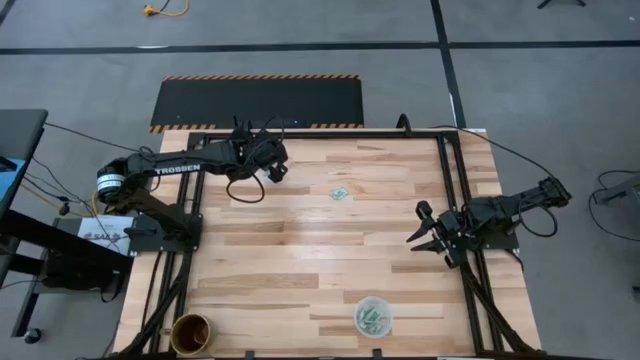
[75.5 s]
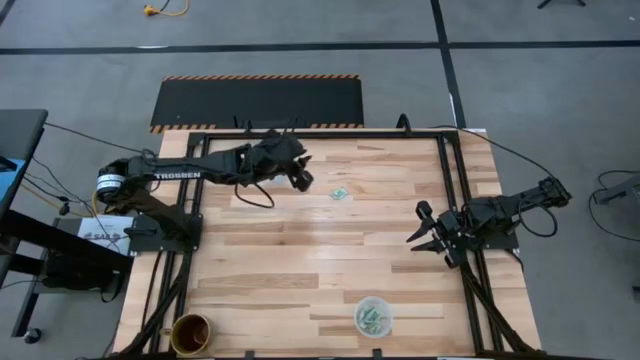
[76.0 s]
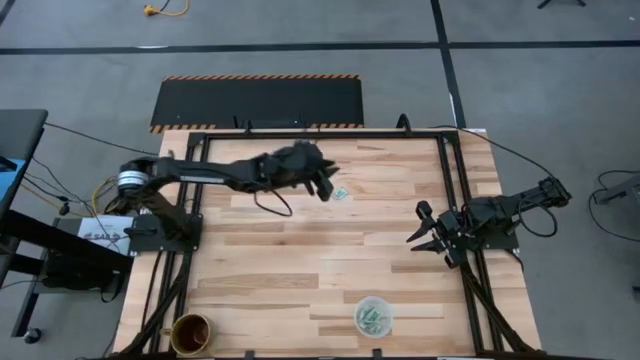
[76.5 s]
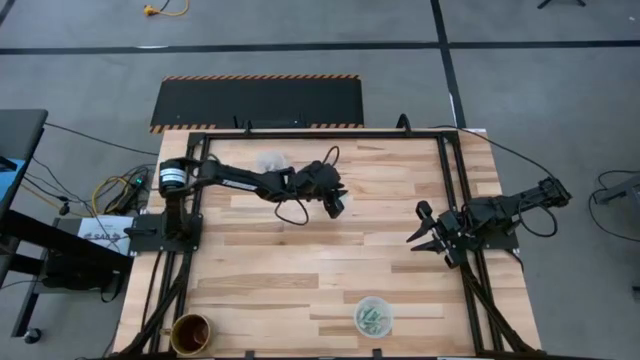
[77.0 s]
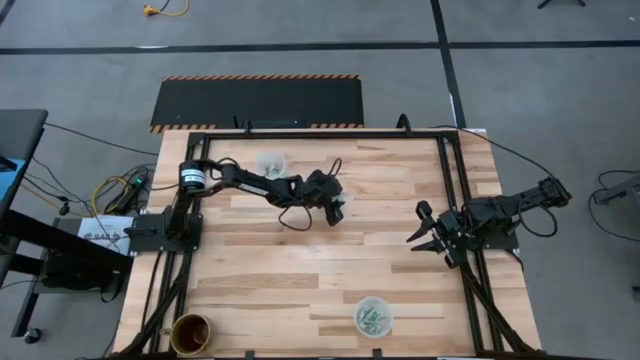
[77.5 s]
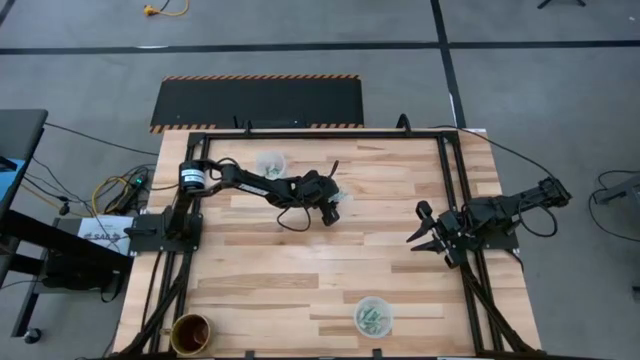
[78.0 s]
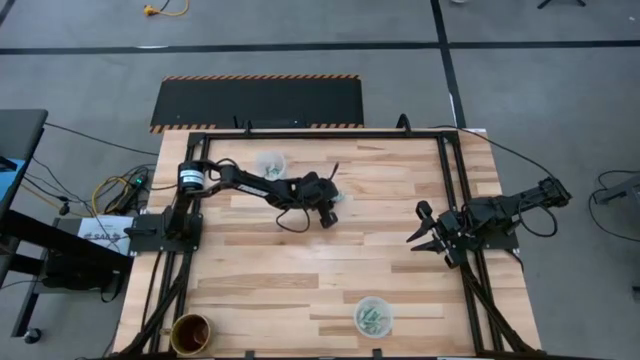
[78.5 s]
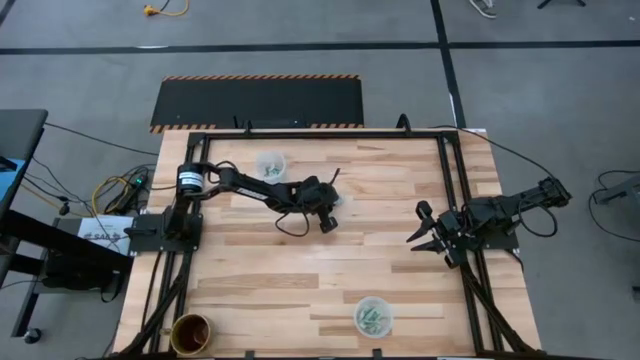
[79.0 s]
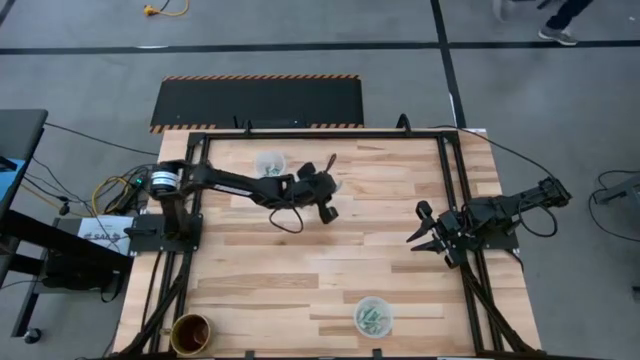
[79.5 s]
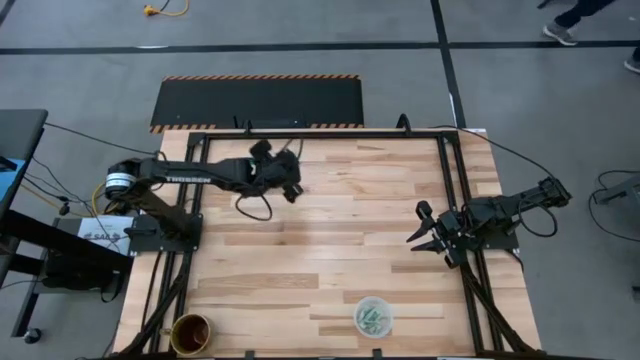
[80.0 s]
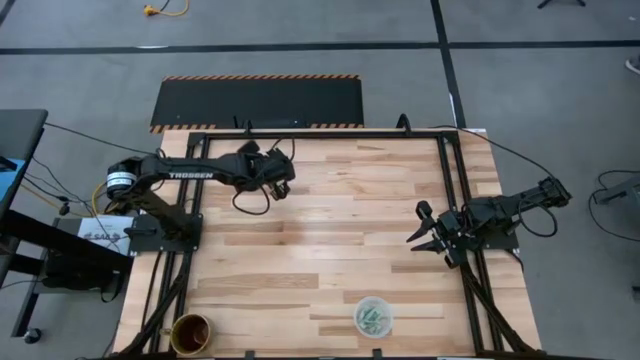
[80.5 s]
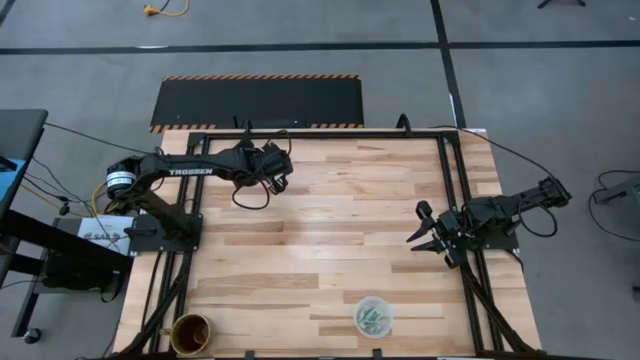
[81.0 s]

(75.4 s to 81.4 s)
Task: Pick and place Stevia / Truvia into bins
Put the white stevia packet into the top transparent container

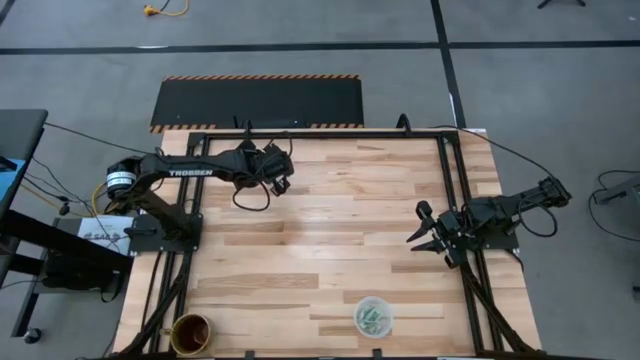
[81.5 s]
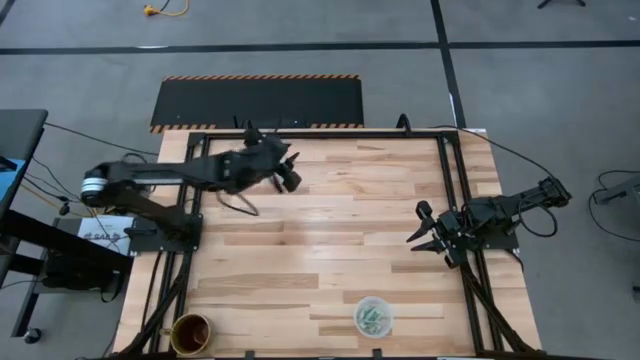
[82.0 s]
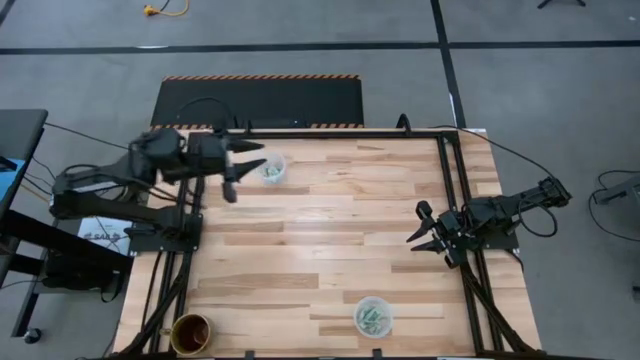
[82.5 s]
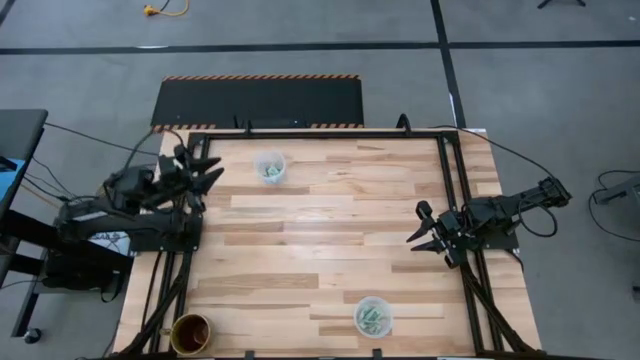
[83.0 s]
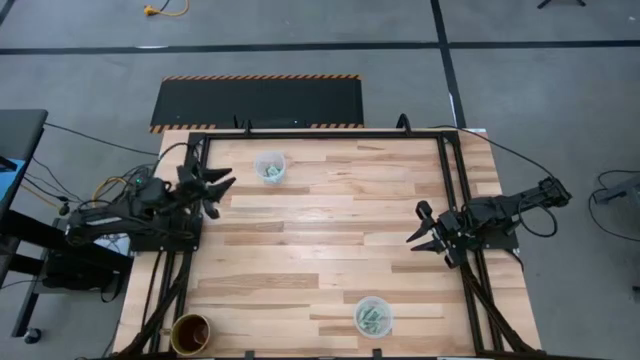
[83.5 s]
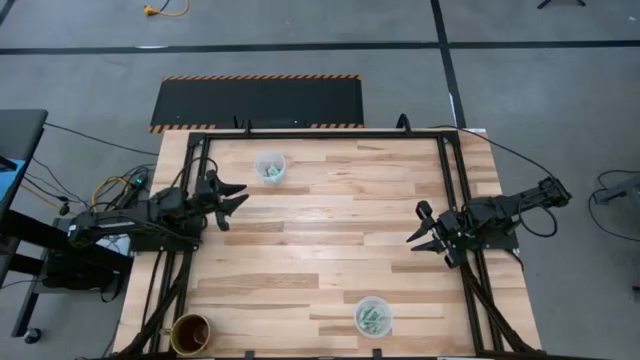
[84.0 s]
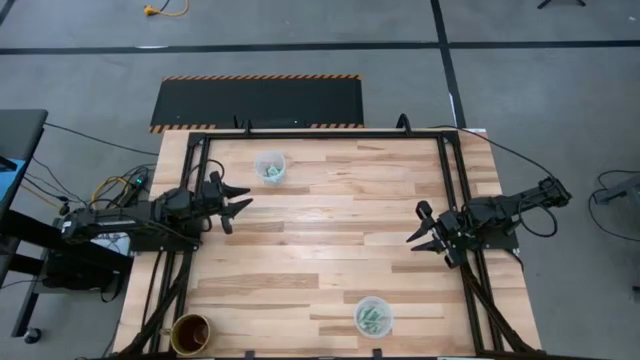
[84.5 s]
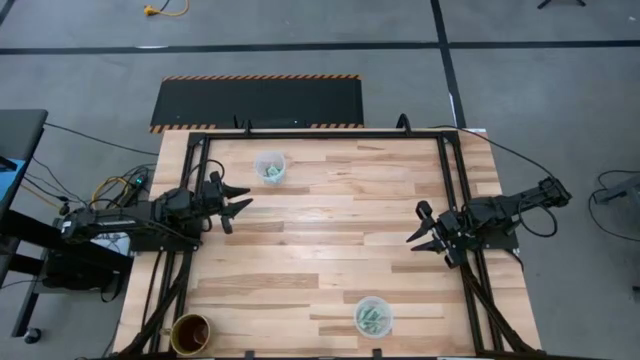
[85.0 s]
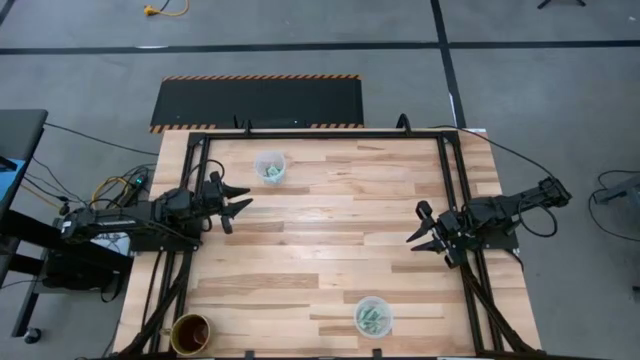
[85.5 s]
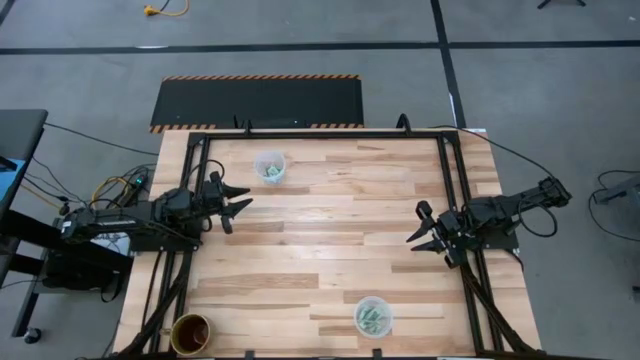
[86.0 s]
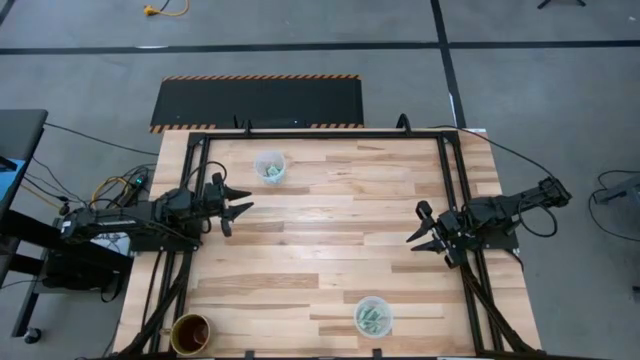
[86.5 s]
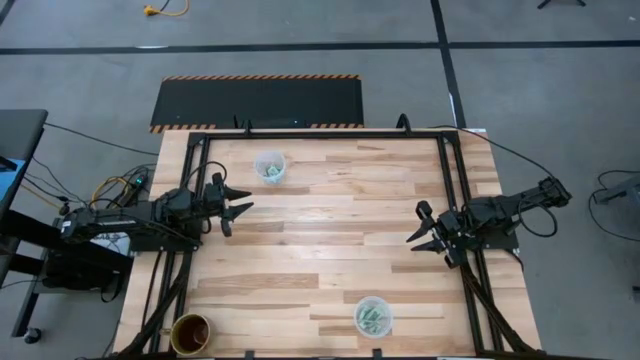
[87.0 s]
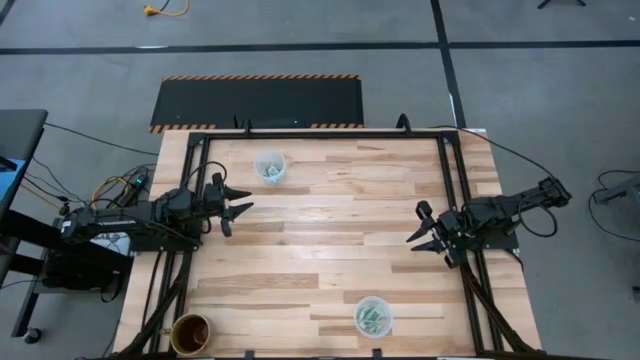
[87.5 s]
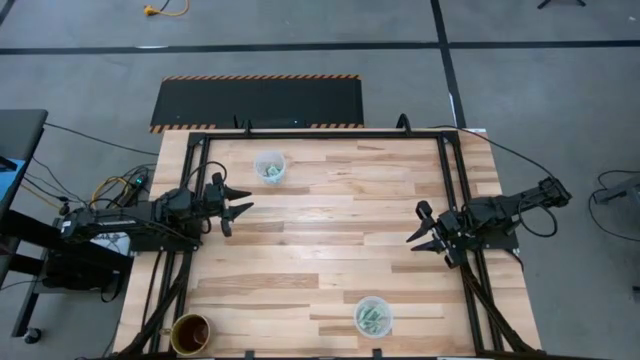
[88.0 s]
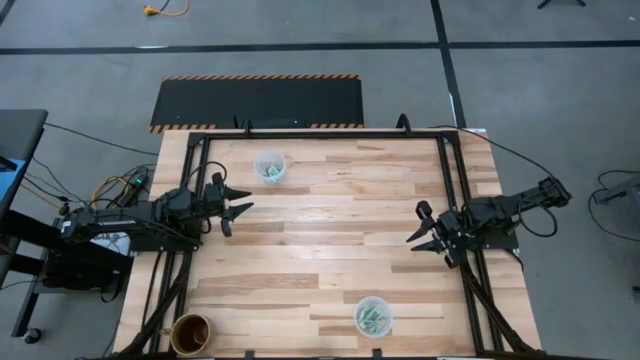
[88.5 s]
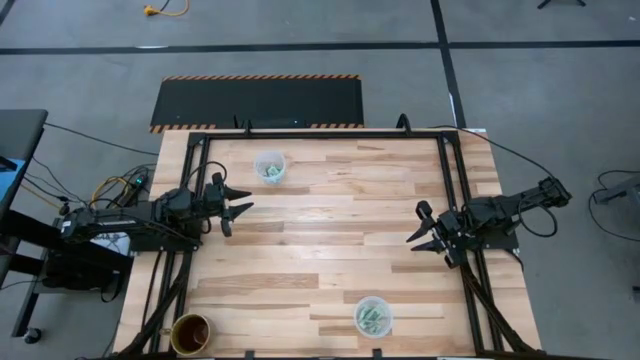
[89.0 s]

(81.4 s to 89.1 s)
Return to Home Position

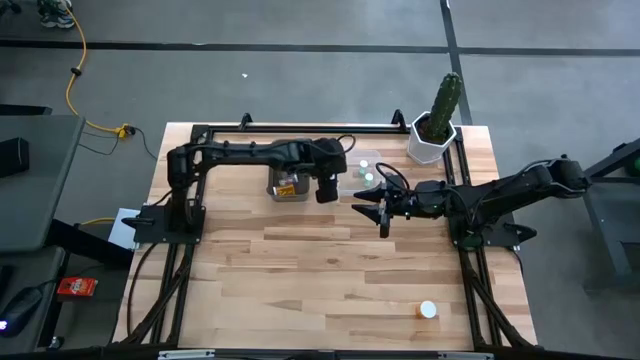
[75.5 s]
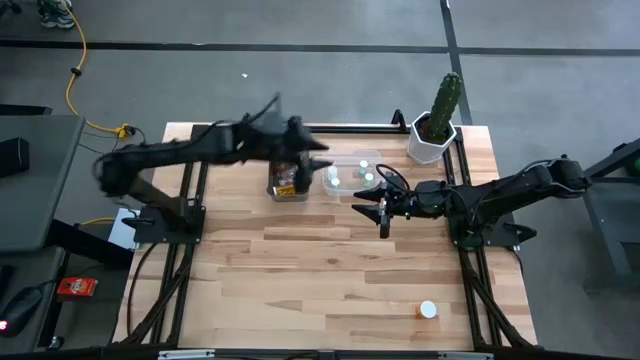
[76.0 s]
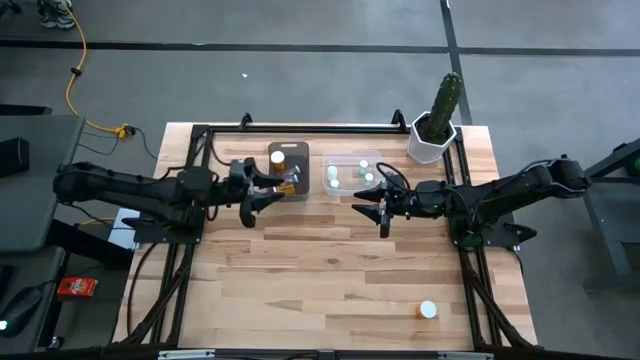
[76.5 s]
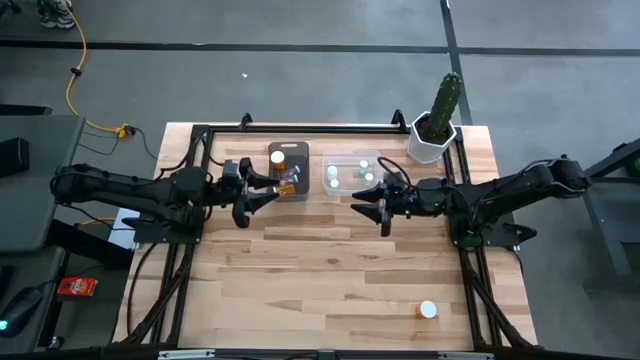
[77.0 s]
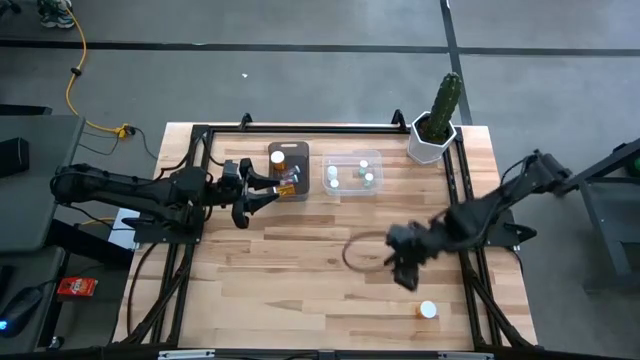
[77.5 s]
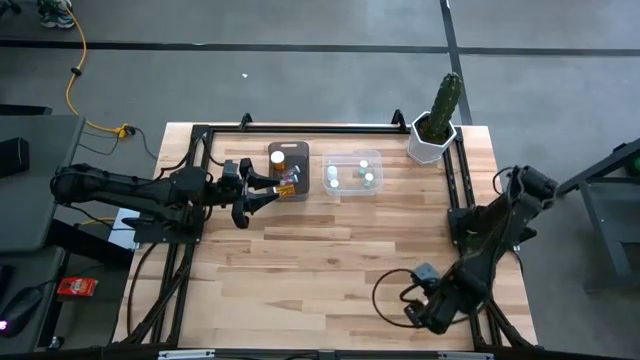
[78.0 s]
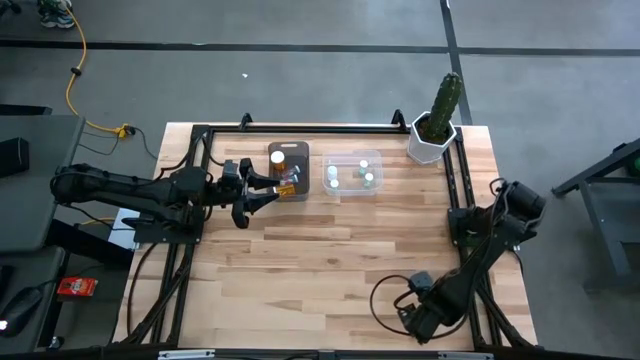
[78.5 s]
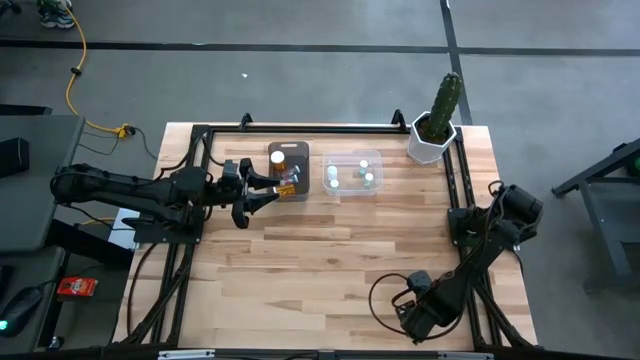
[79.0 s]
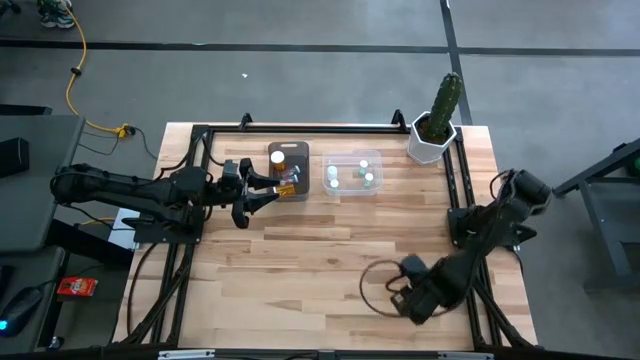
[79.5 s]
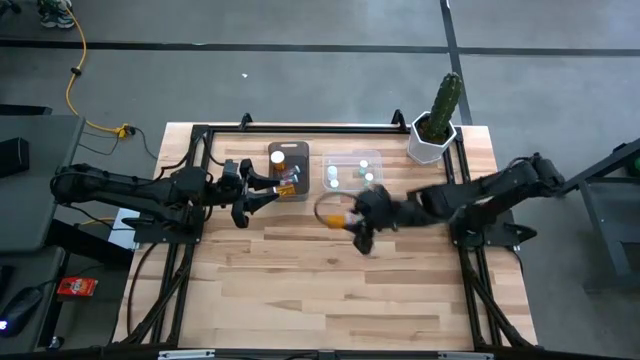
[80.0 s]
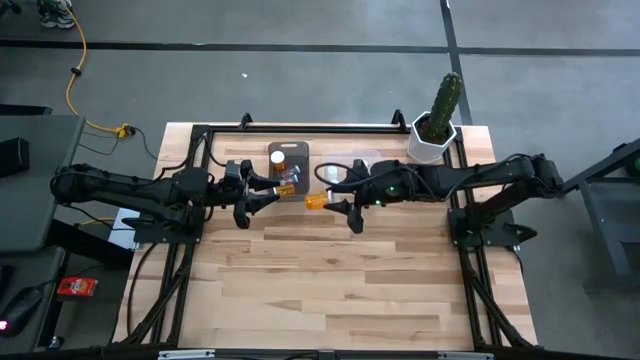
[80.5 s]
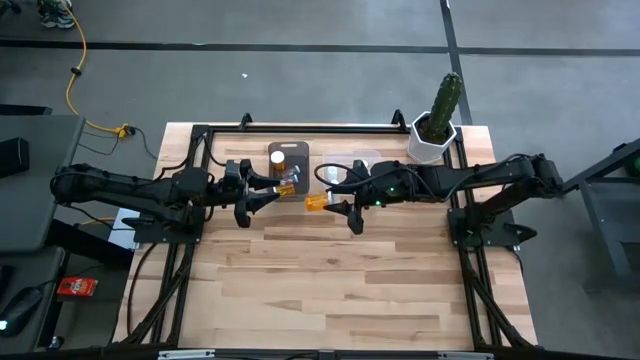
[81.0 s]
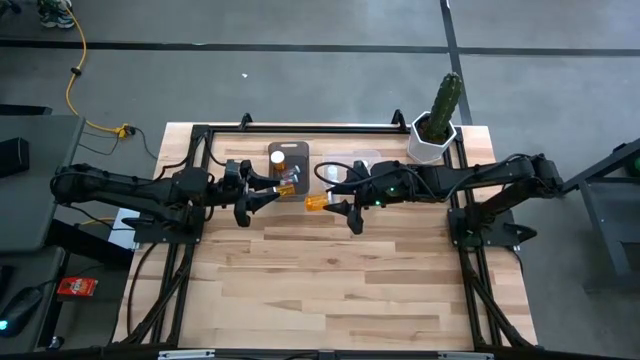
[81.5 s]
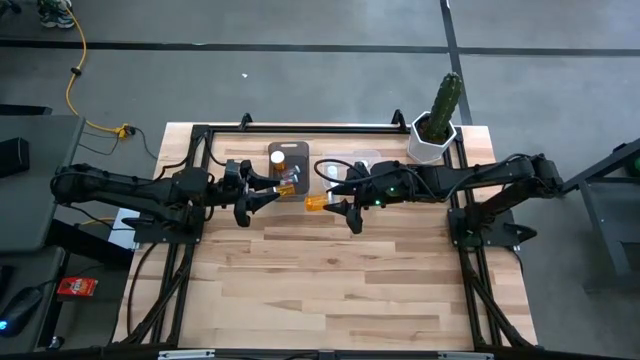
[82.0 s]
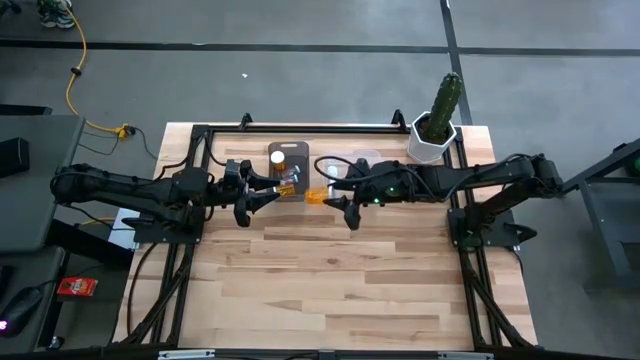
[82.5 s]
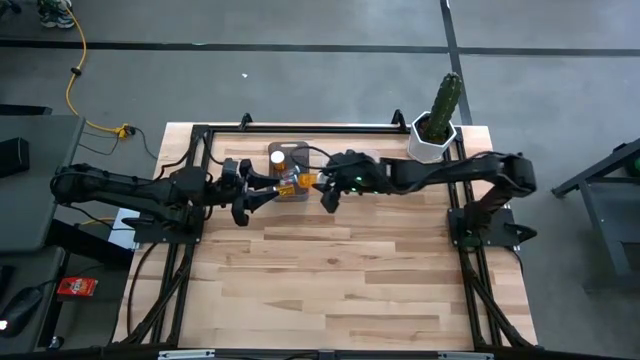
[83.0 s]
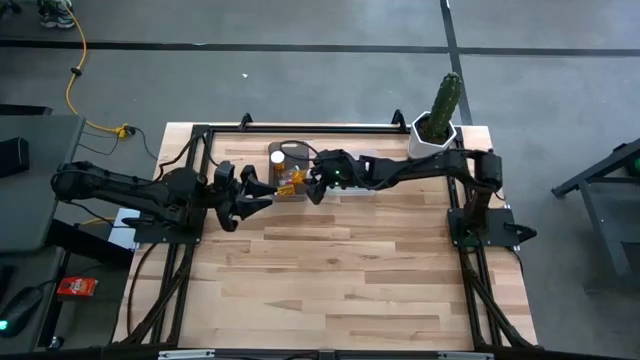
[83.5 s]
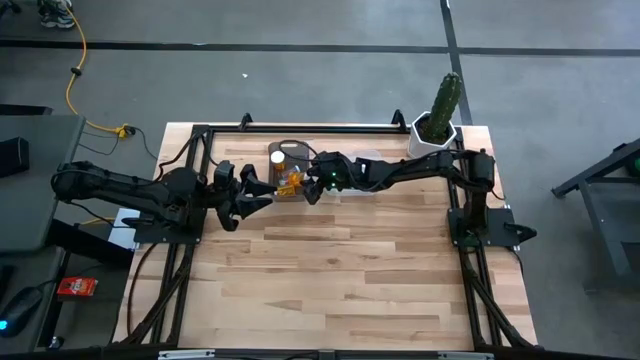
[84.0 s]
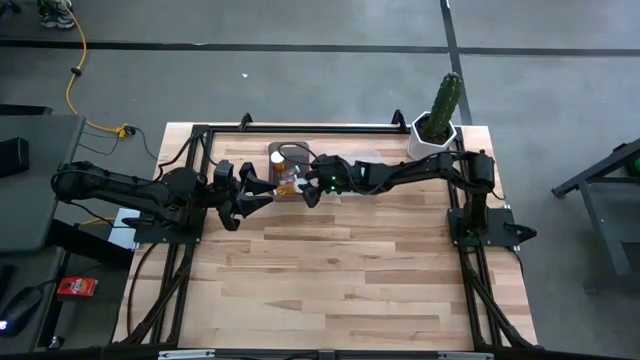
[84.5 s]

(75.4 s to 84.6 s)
Task: Pick and place medicine bottles into bin by pill shape (circle, oval)
Put the orange capsule bottle into the black bin
